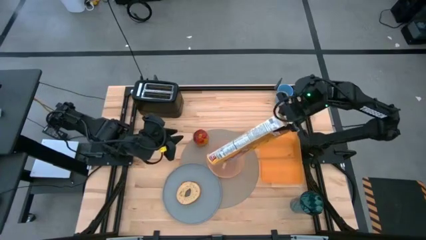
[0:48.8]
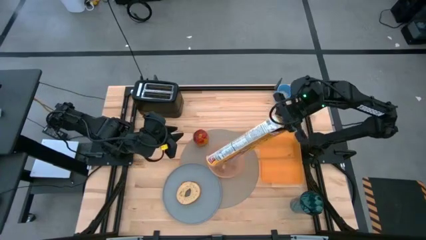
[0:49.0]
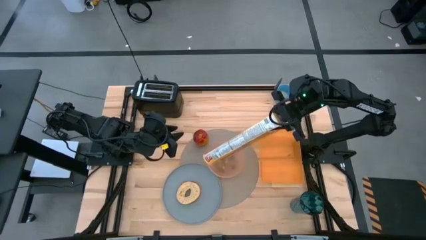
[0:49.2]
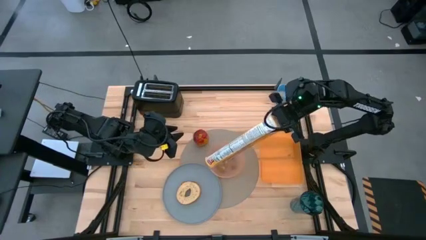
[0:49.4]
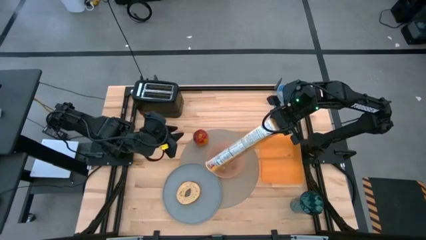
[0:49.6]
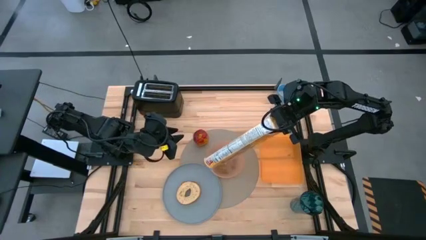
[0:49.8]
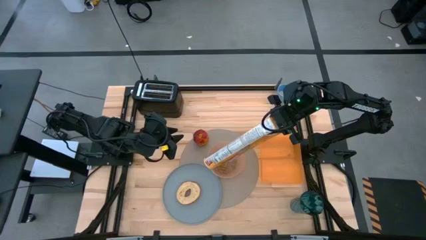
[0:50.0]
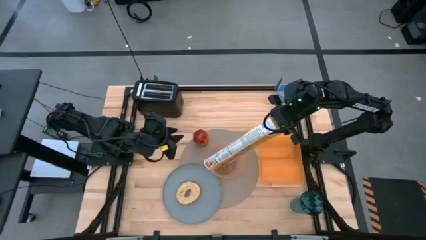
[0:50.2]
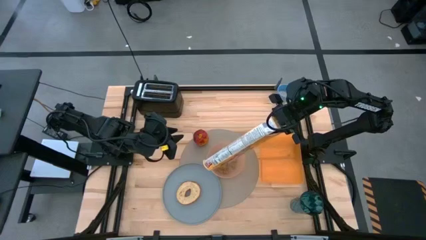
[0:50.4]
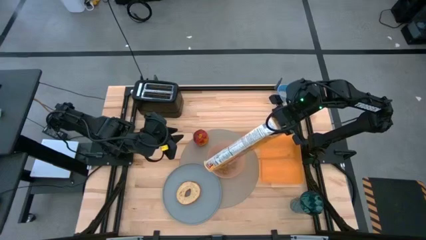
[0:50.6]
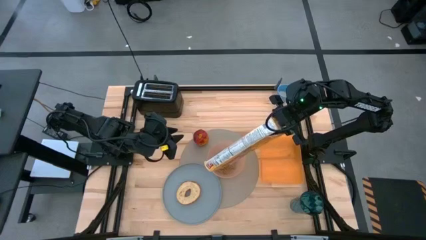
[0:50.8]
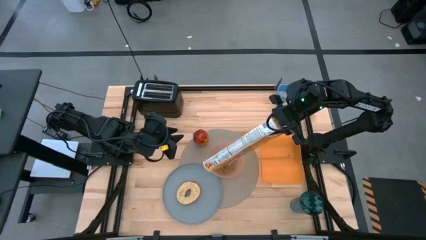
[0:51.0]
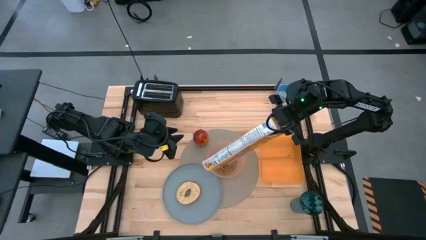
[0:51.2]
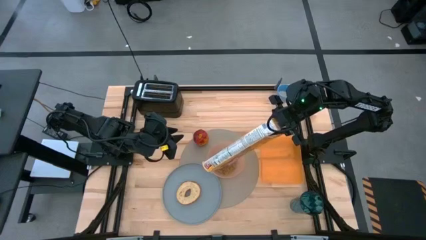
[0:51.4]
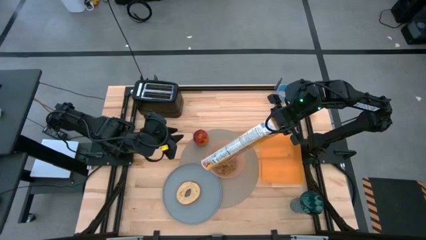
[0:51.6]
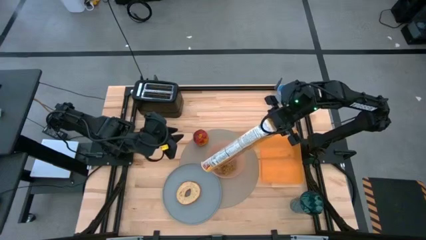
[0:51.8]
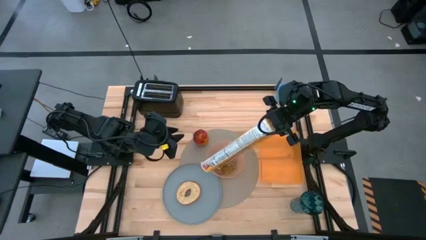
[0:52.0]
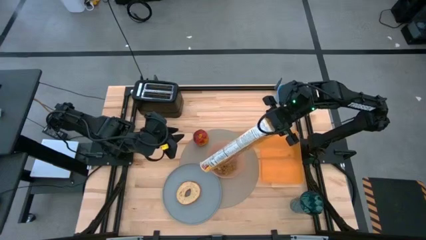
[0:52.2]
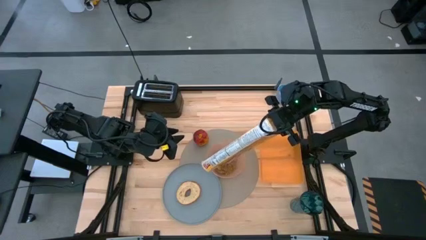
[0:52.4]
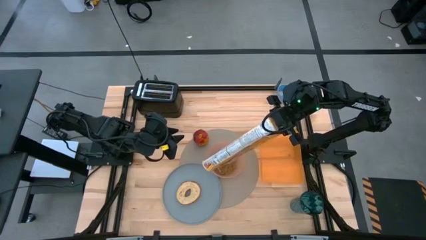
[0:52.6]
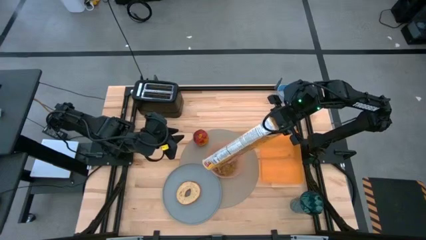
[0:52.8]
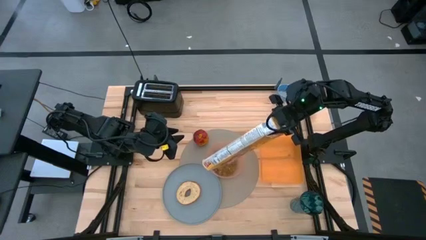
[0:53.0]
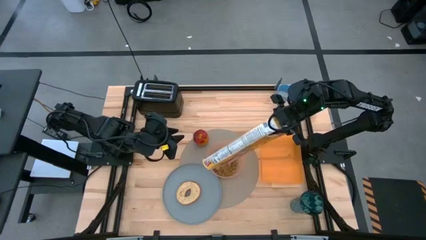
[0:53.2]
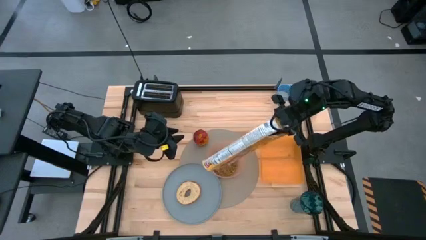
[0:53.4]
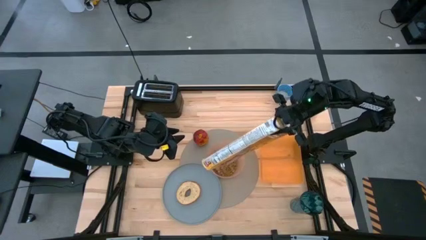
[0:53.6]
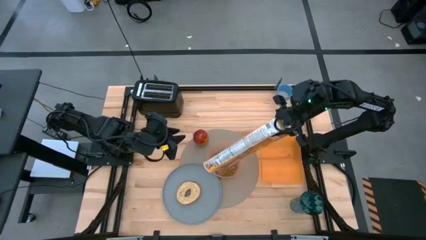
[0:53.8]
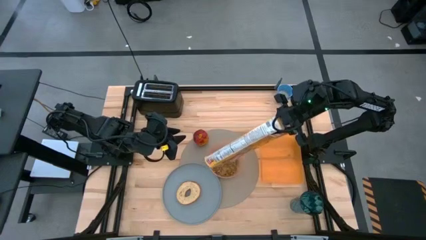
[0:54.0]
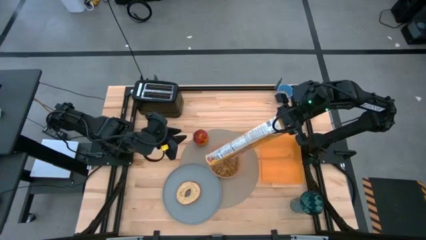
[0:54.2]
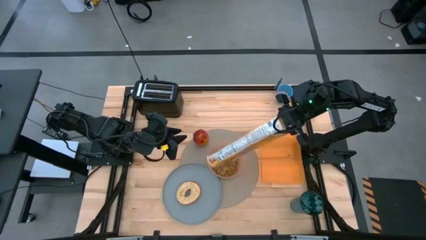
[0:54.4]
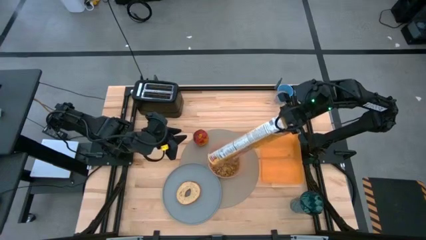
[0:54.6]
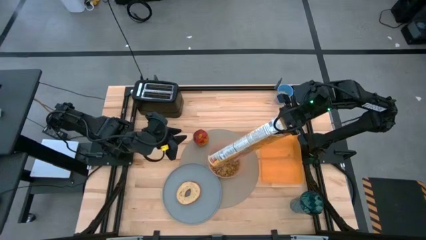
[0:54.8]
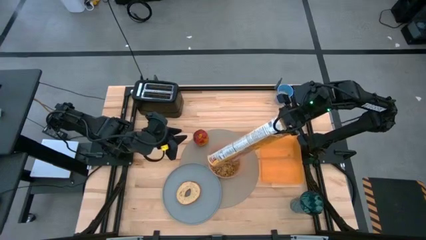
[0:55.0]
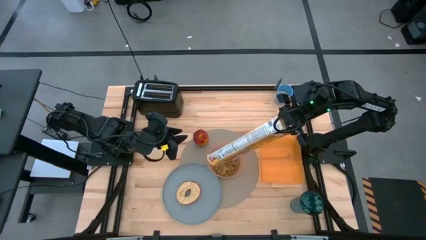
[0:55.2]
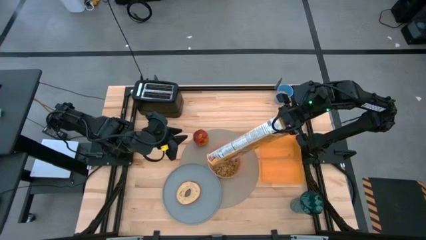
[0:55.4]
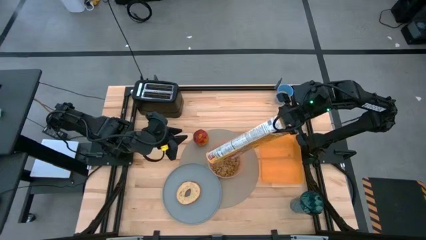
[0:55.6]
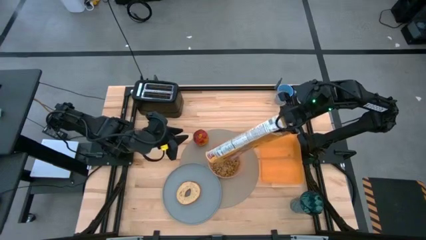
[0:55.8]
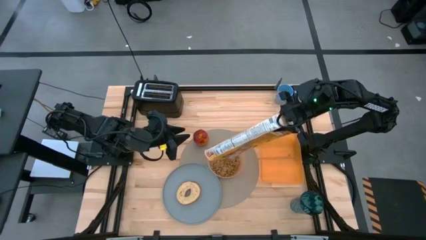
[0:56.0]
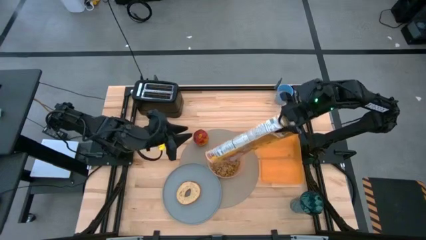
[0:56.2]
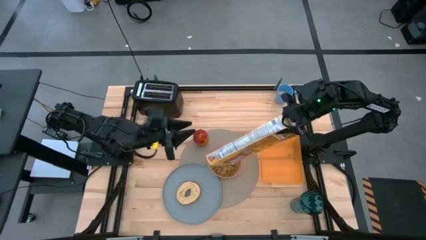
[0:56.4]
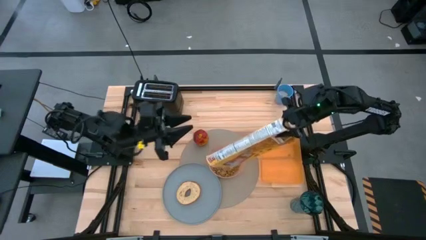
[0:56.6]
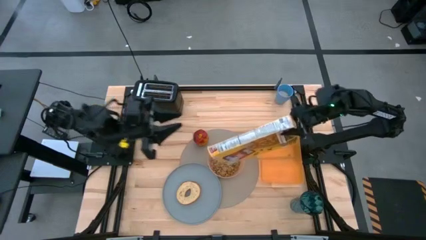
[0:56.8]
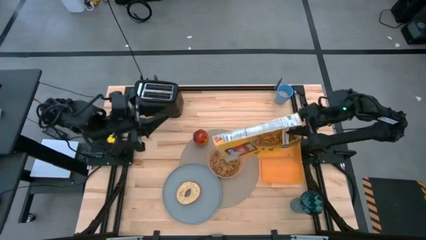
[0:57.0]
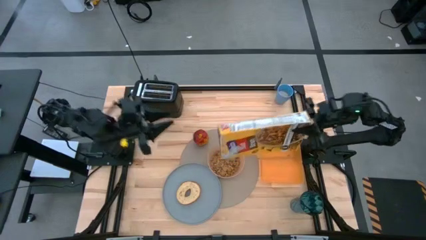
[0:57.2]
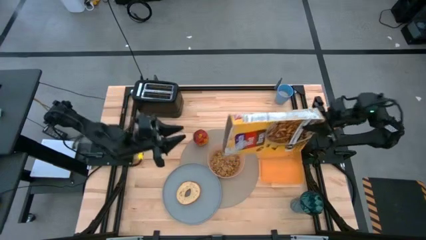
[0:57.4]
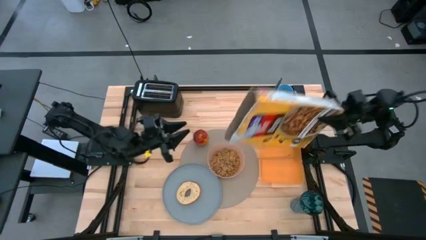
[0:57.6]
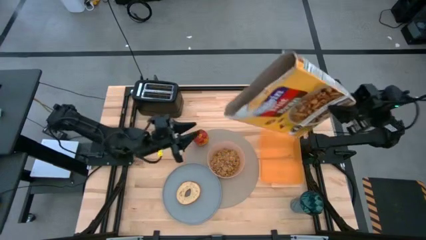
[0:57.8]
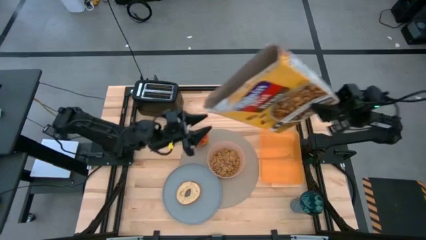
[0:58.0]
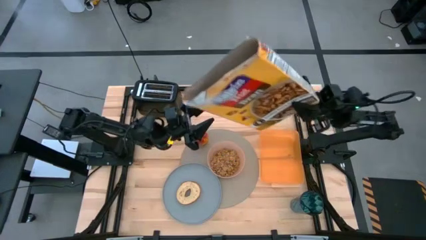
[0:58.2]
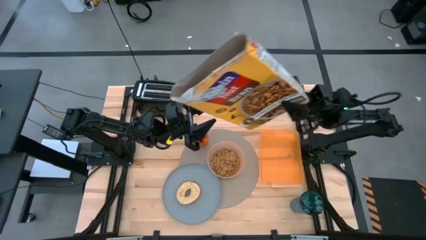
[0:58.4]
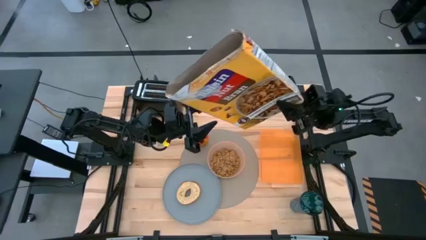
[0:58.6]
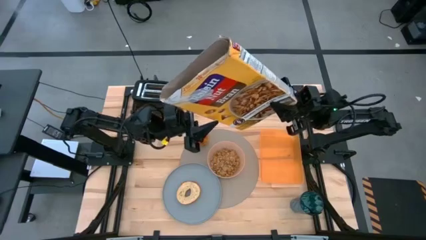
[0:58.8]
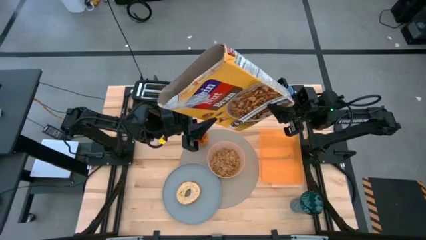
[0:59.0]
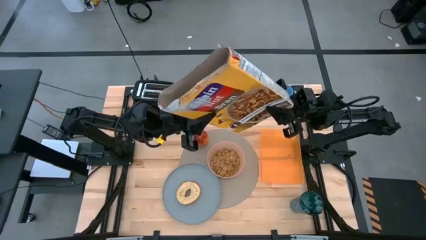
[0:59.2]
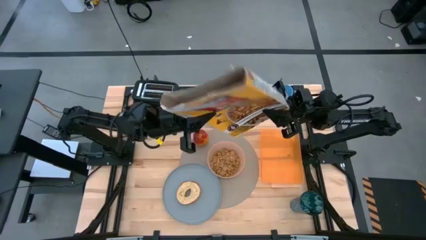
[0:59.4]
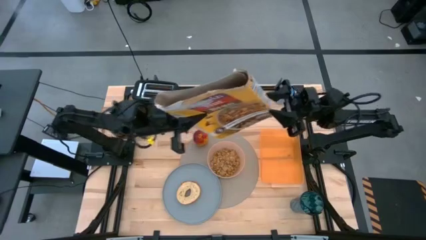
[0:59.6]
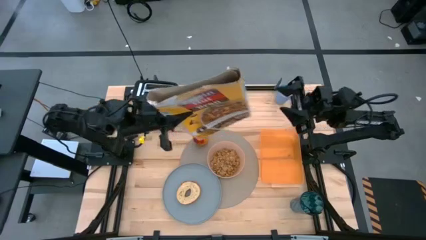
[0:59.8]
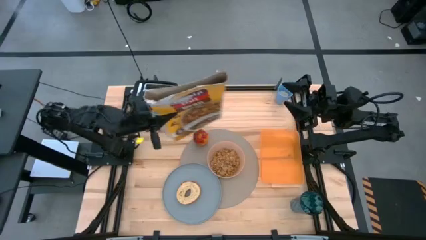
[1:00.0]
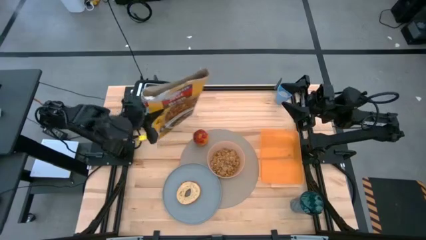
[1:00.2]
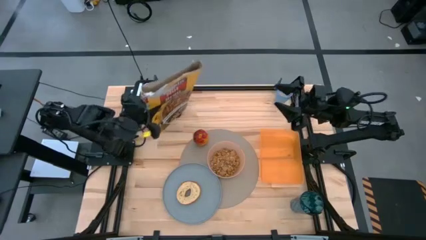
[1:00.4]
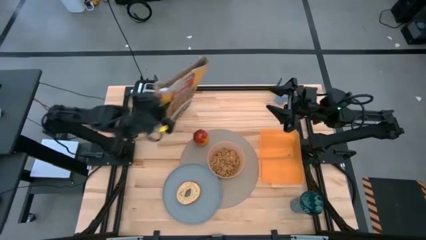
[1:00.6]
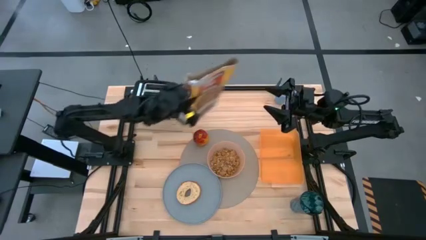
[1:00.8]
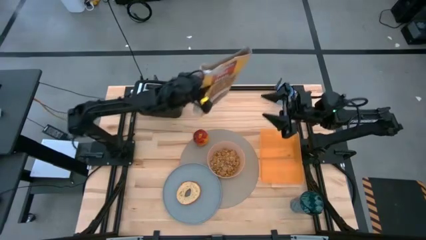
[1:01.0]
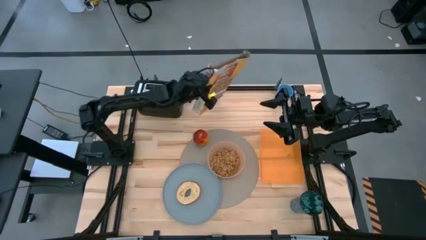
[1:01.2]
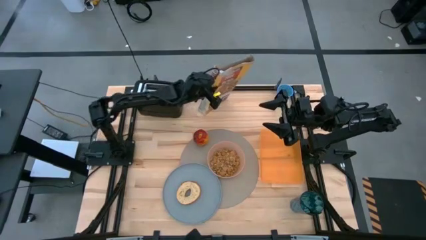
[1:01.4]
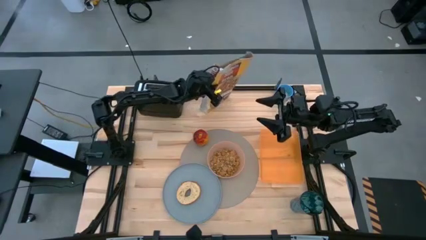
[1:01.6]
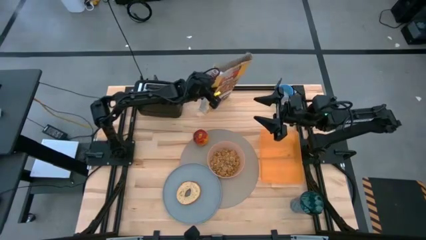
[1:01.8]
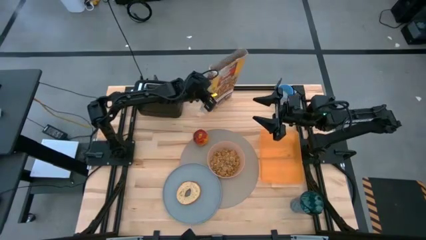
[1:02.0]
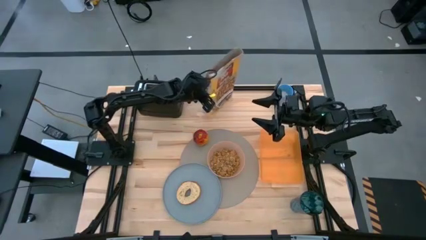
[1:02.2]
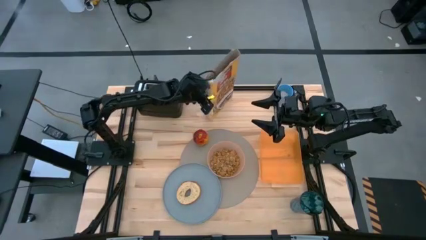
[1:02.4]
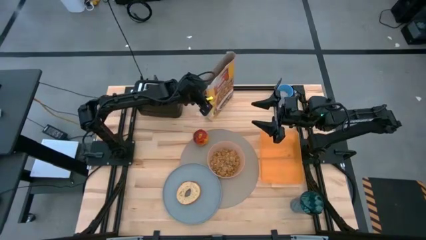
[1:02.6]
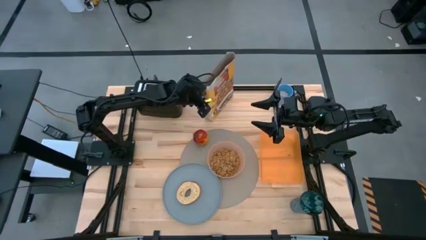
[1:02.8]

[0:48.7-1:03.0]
Task: Arrange a breakfast setting
Pour the cereal from the yellow cereal box into the light orange bowl
